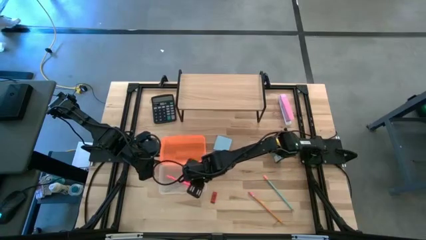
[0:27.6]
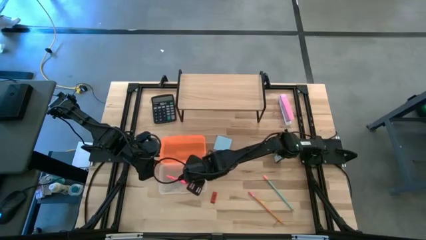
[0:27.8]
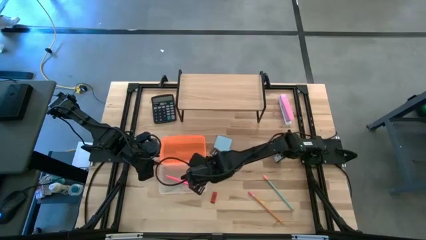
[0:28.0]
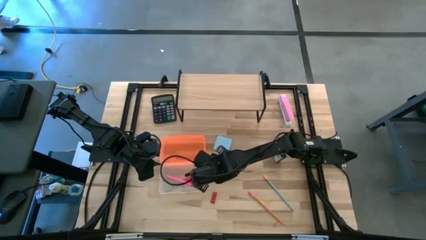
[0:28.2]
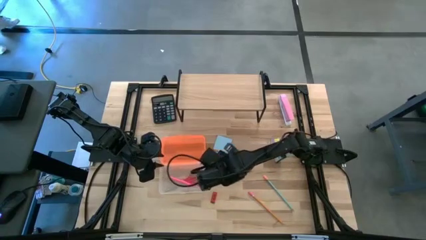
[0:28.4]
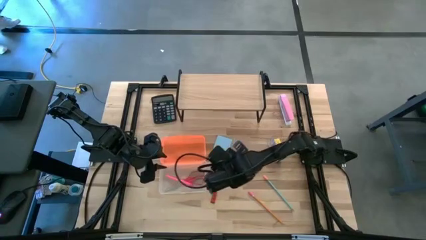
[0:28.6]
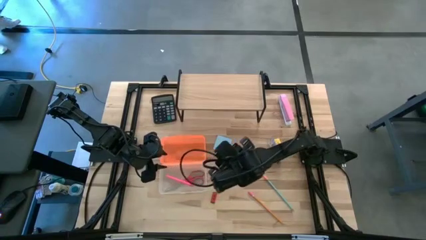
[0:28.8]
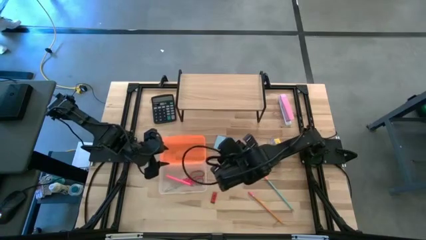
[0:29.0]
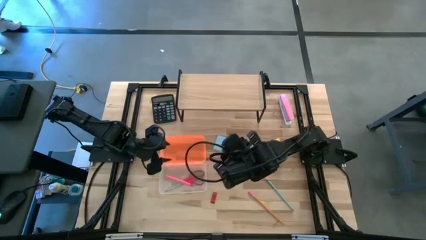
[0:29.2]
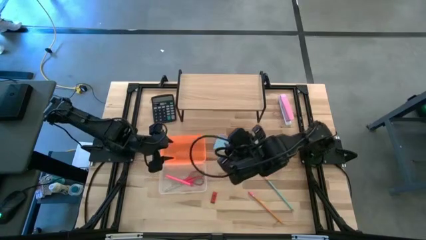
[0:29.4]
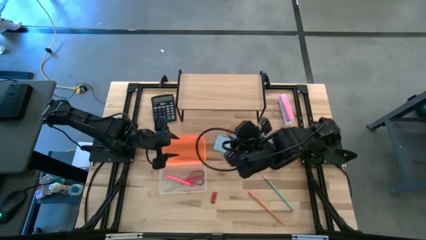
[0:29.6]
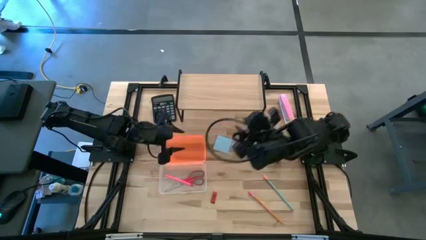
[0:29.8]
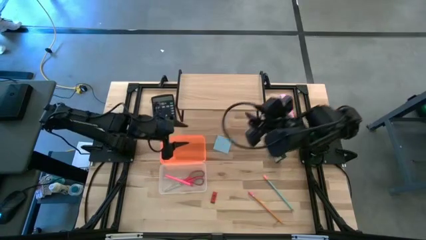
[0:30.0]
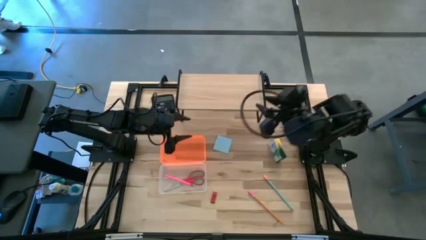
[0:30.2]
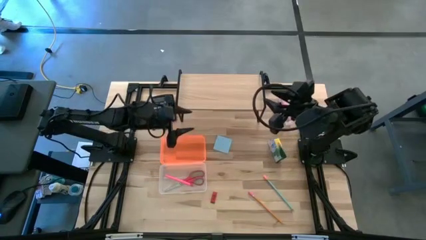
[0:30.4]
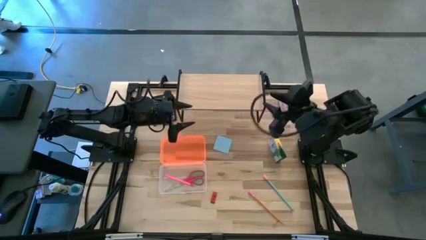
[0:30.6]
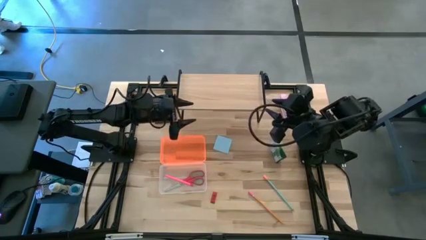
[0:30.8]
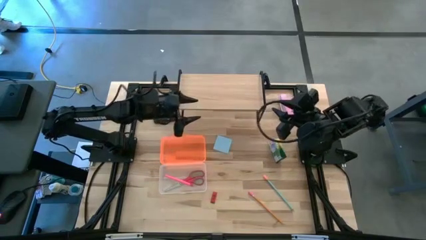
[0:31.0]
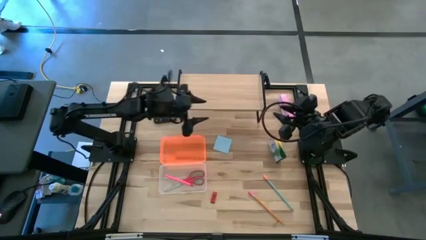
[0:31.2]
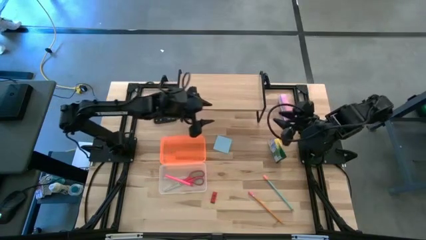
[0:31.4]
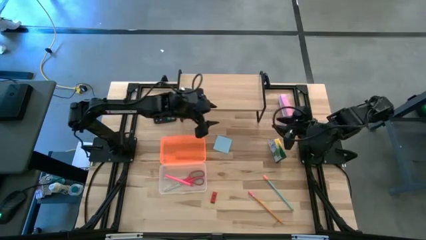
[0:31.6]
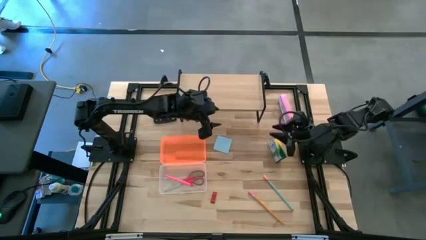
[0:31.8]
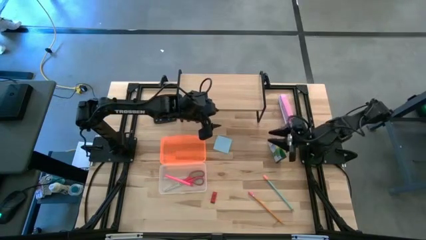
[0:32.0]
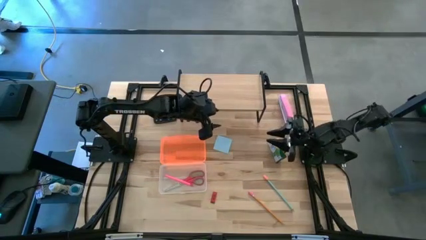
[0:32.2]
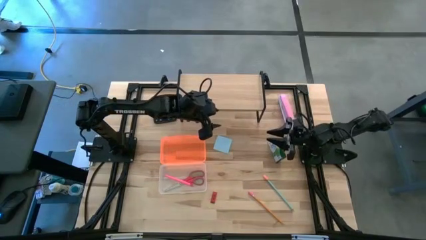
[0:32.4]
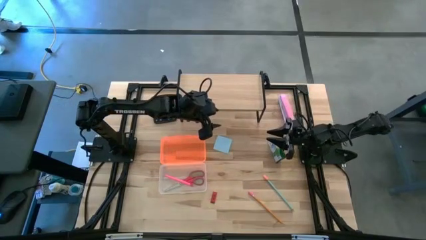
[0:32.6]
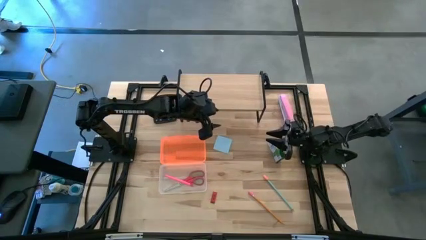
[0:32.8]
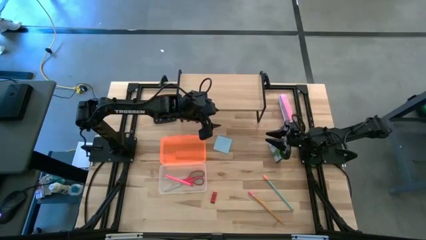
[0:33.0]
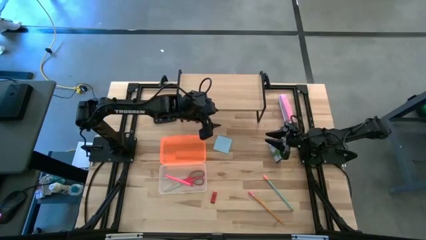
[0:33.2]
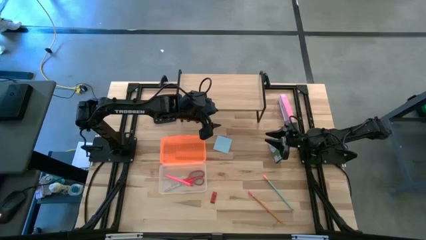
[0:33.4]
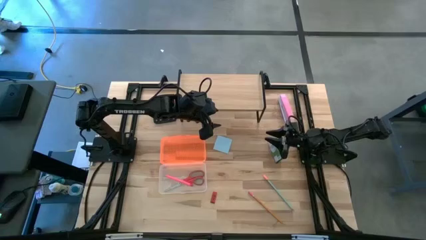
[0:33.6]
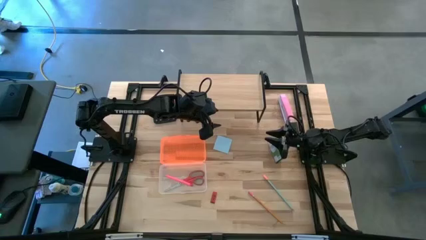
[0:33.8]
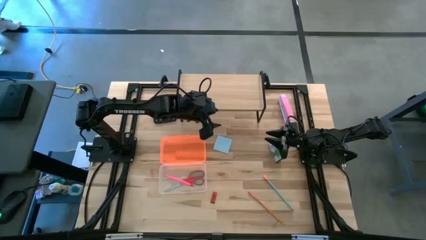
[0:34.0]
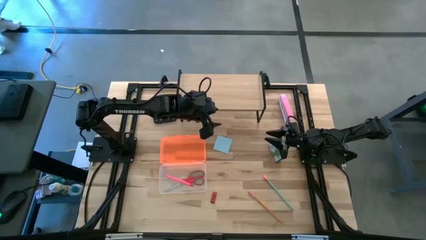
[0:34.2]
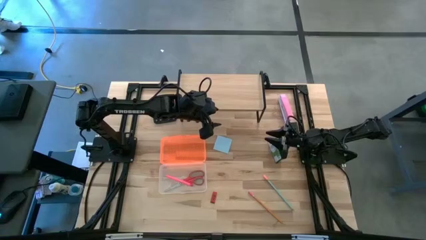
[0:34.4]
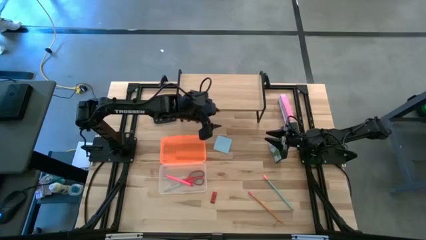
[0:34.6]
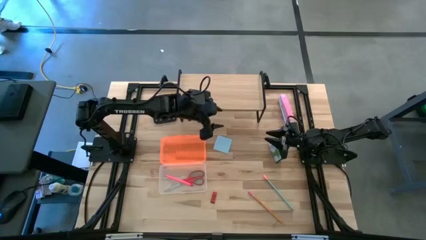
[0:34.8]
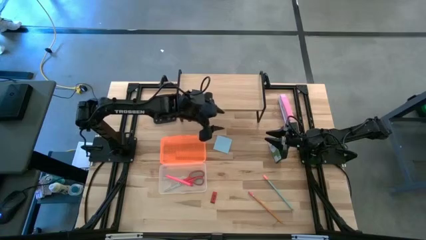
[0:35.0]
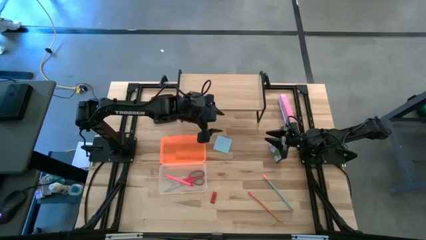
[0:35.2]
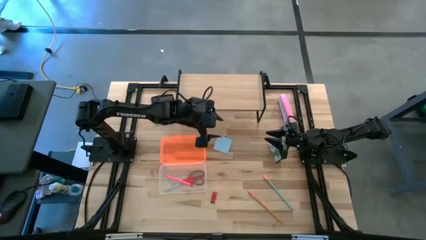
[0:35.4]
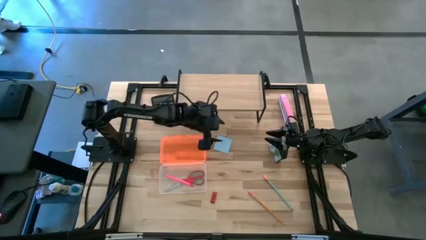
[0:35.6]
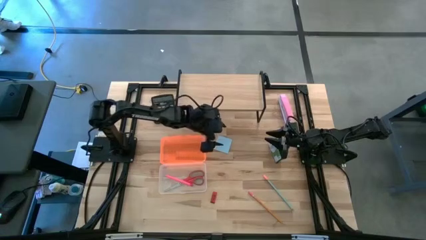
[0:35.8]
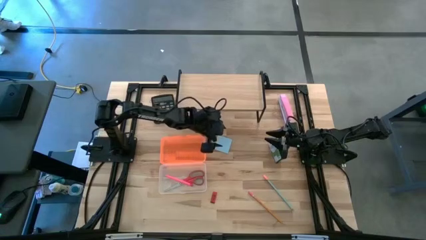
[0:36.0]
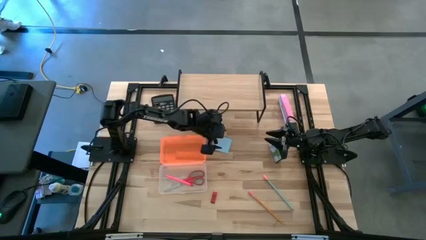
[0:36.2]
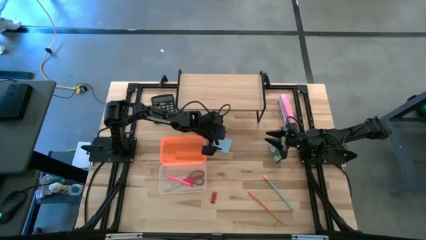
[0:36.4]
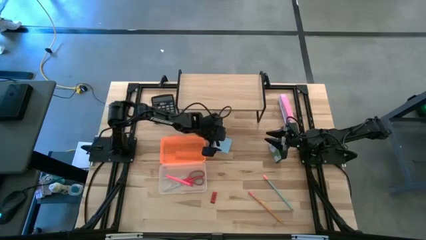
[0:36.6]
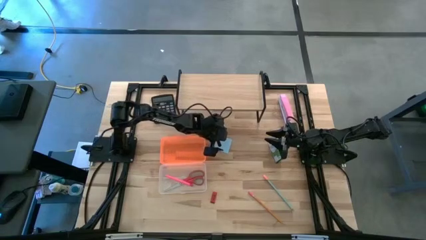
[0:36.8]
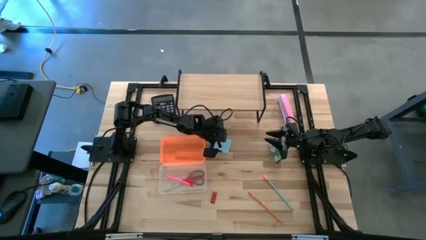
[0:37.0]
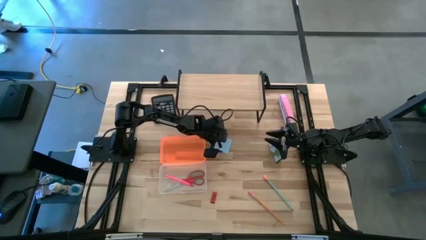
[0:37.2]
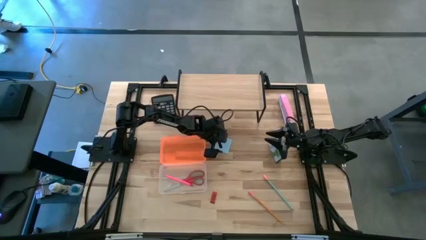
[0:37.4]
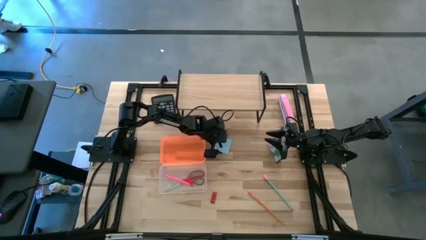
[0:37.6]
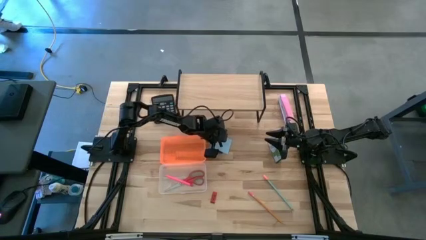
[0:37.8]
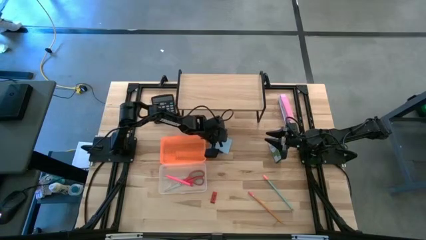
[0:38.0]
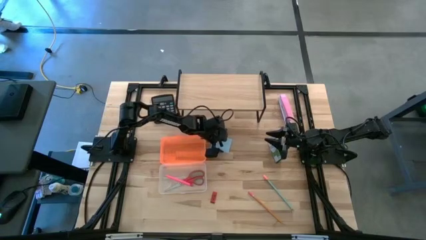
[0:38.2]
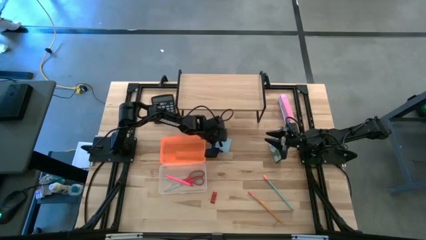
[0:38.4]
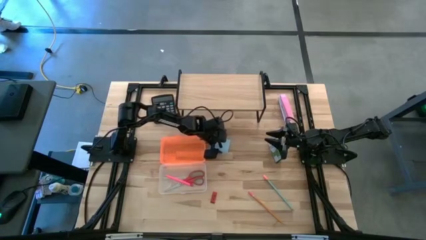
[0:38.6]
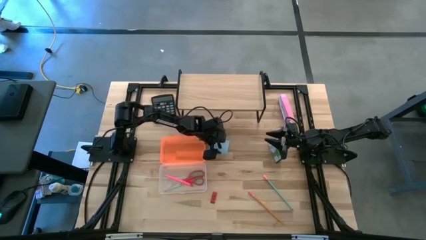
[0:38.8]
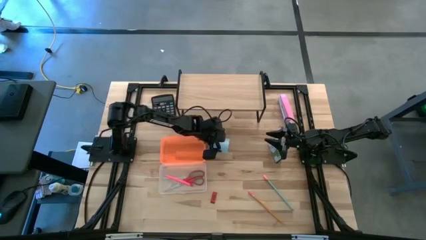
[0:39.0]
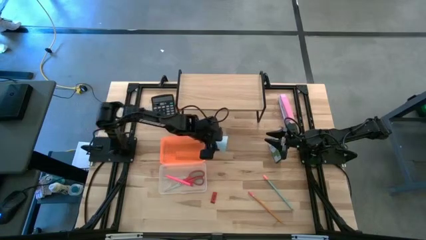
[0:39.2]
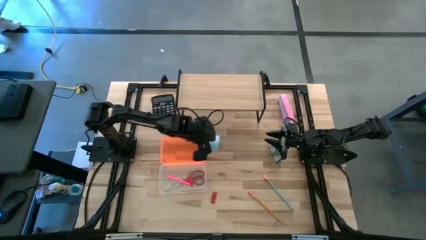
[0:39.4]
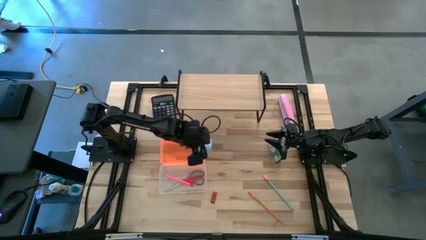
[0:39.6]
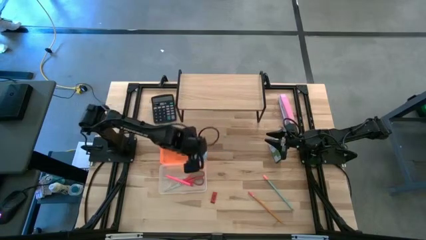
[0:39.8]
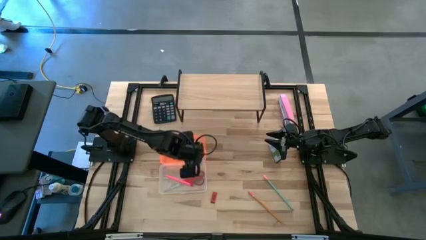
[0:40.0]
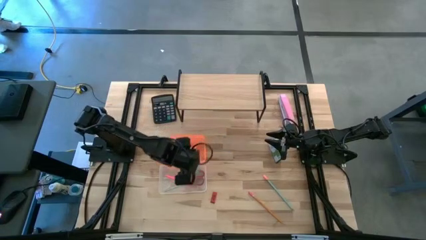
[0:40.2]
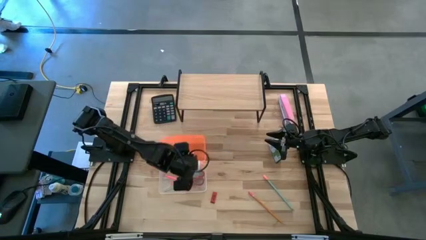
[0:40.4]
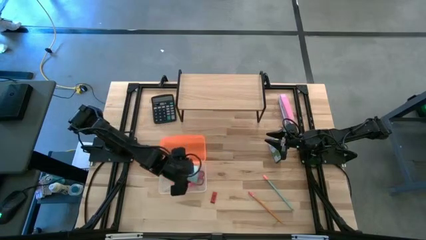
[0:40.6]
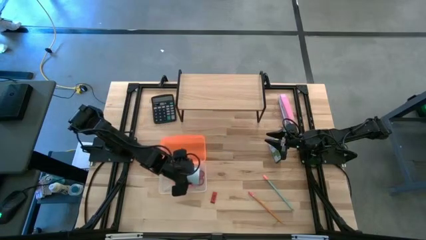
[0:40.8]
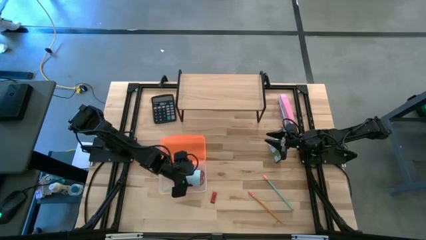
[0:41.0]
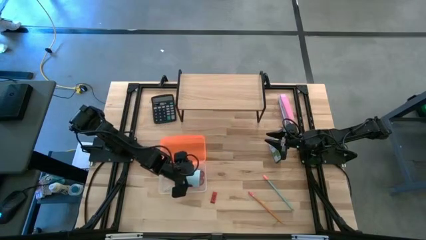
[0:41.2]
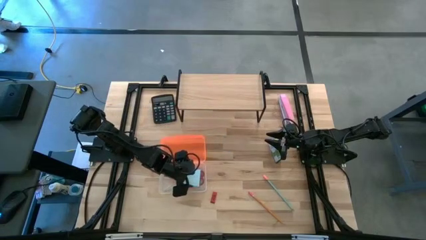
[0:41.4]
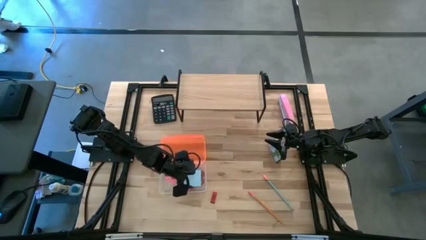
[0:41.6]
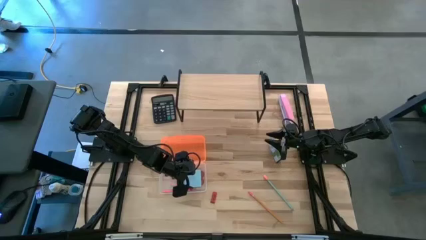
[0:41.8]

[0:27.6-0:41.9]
Task: Pack school essentials
Put the blue sticky note into the supply box

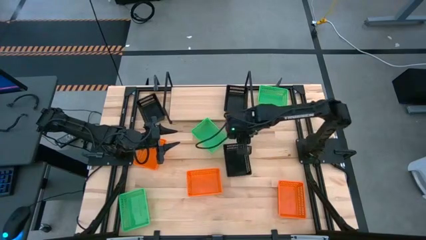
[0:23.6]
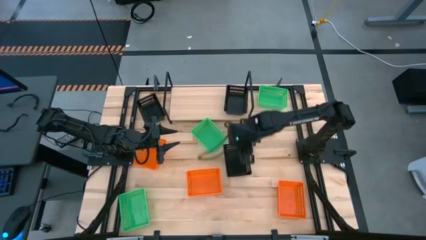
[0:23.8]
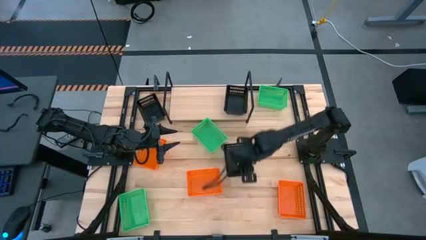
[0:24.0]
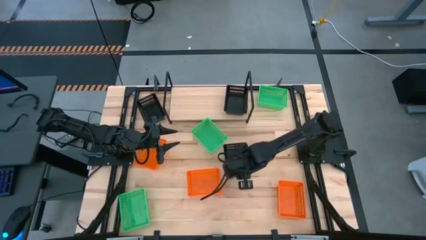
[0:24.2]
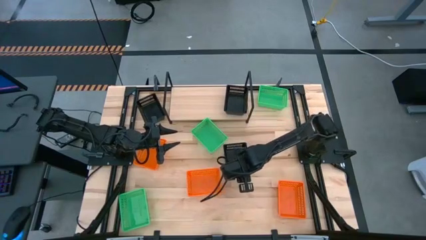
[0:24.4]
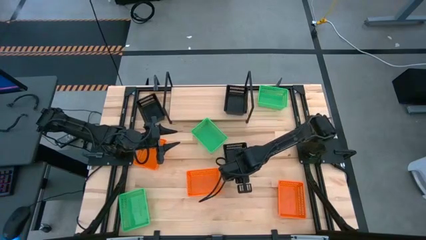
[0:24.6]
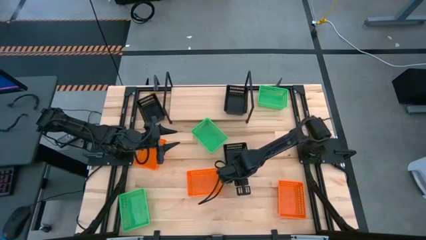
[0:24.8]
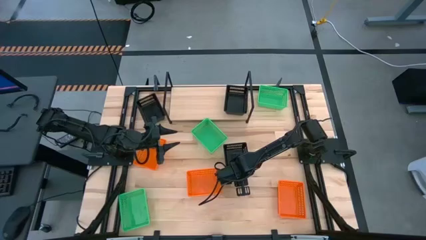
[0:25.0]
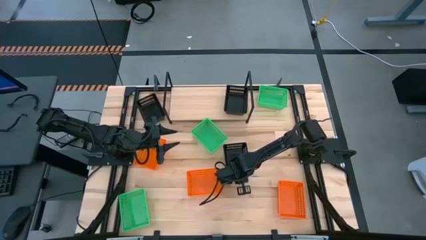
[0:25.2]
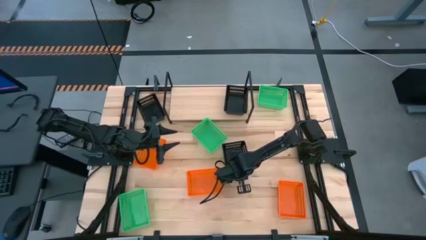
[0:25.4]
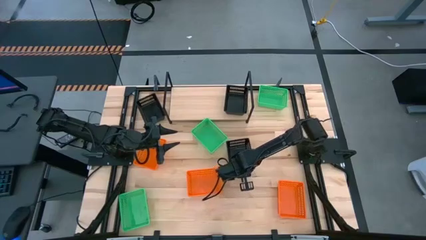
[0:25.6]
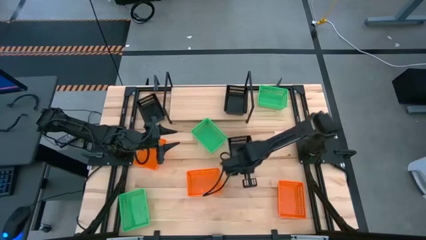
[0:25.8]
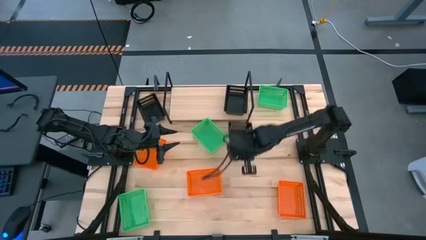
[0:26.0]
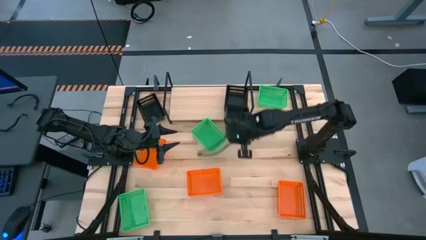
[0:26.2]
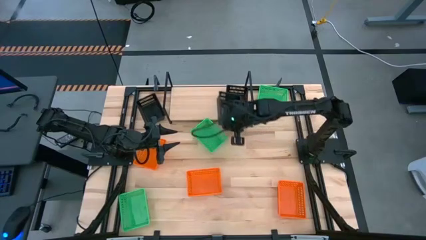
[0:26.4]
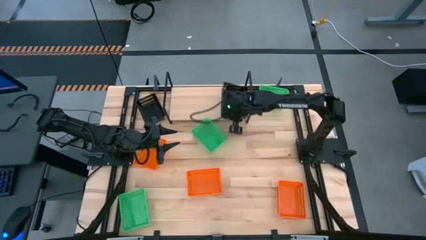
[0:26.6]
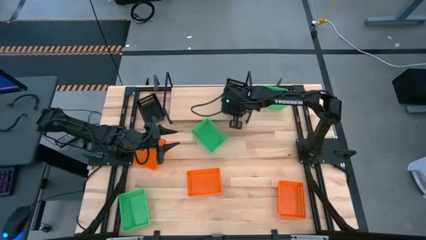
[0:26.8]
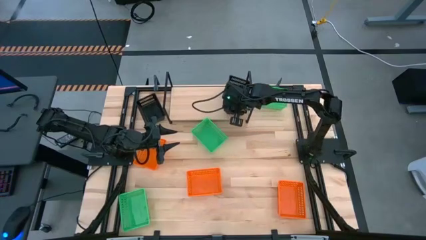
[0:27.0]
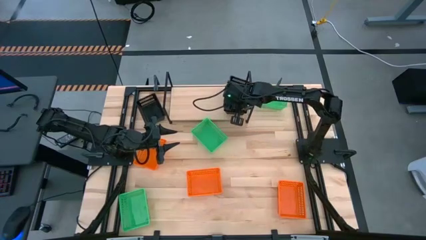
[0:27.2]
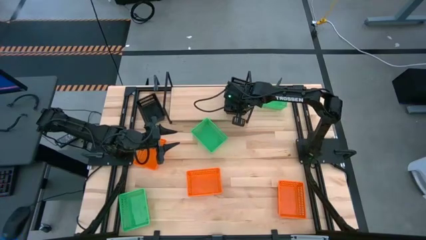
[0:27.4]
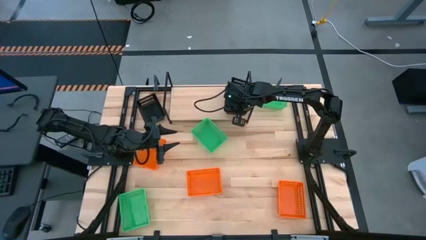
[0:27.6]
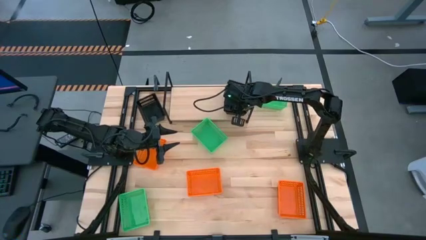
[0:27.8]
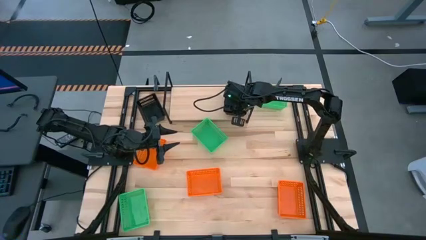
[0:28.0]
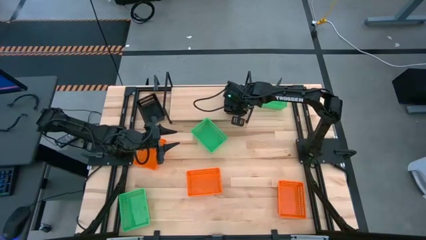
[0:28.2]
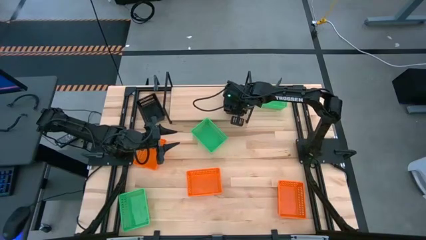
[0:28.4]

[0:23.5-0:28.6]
Task: Stack baskets on shelf by color
Stack the bottom black bin on top of the black bin on the shelf
